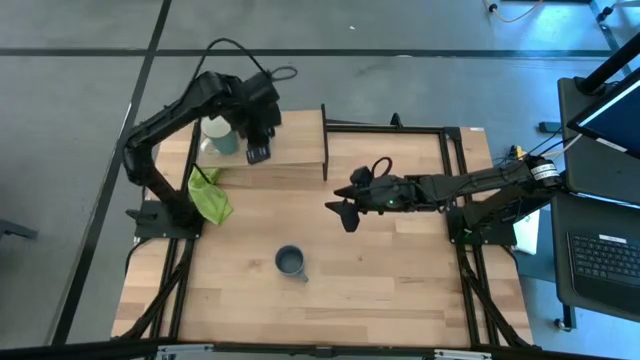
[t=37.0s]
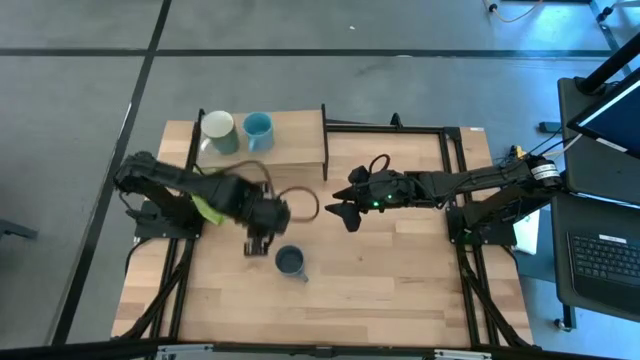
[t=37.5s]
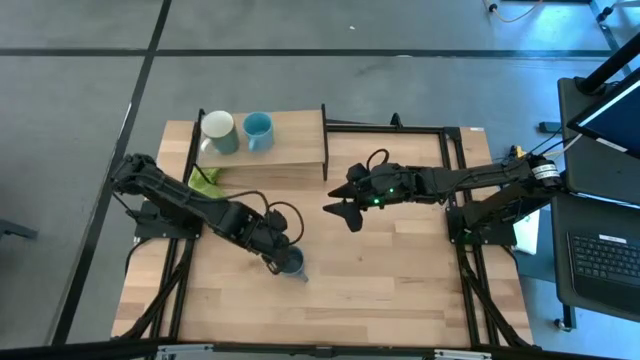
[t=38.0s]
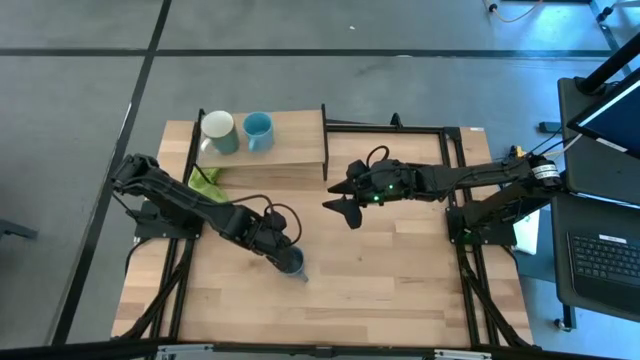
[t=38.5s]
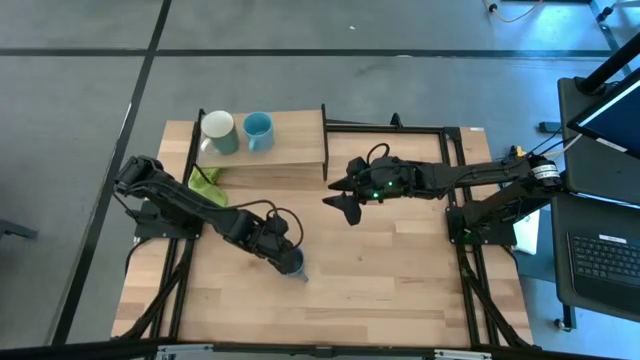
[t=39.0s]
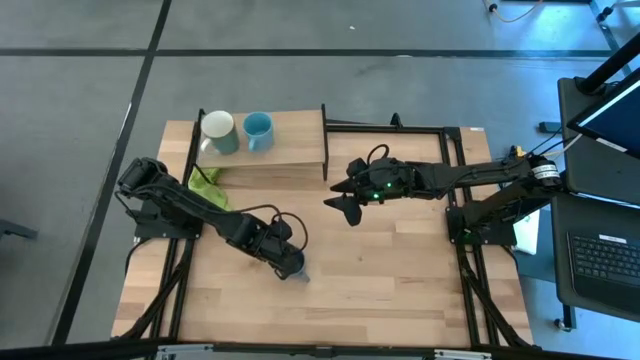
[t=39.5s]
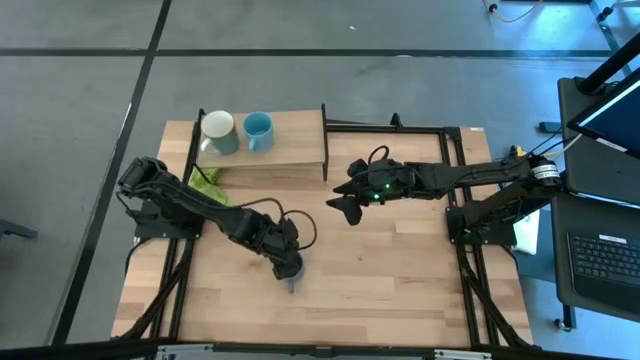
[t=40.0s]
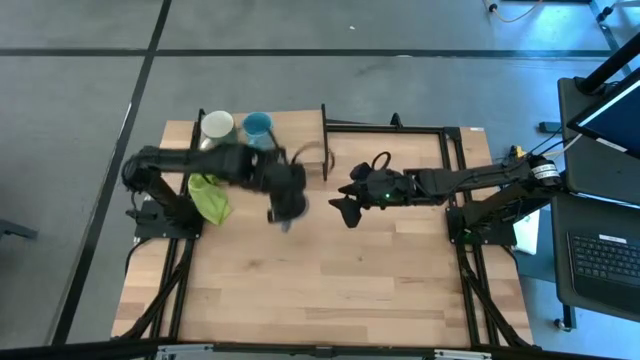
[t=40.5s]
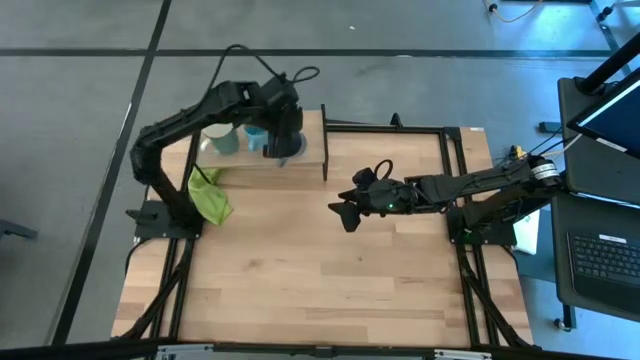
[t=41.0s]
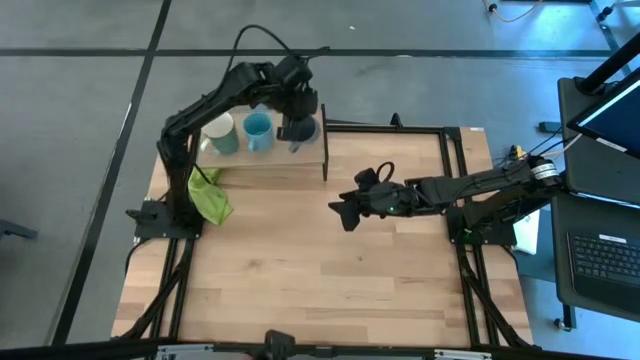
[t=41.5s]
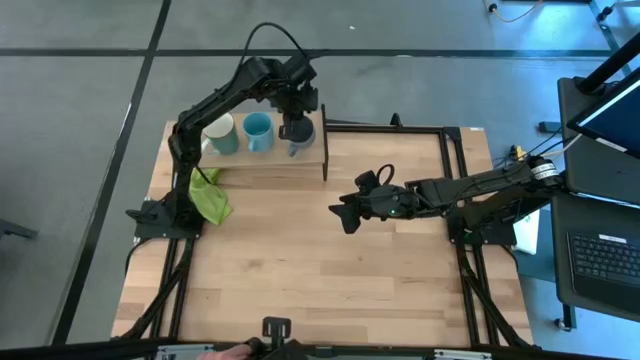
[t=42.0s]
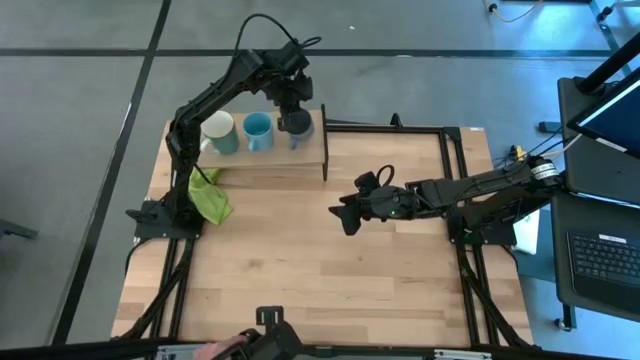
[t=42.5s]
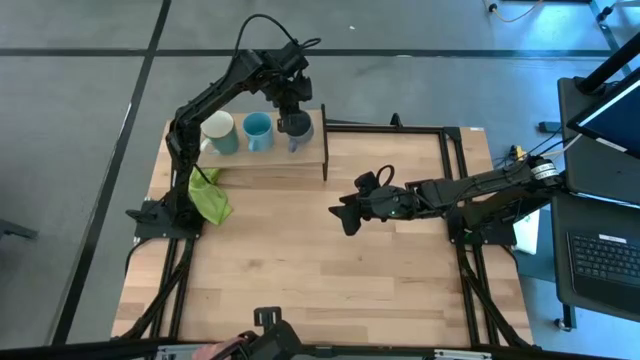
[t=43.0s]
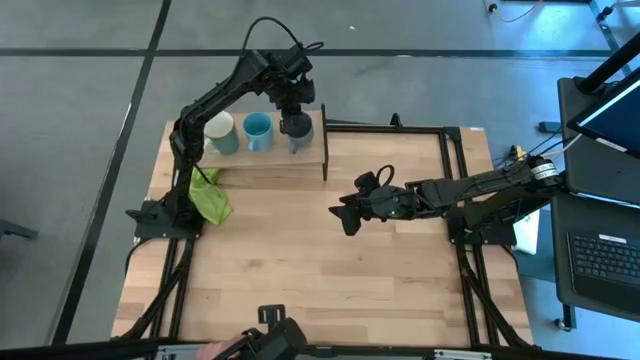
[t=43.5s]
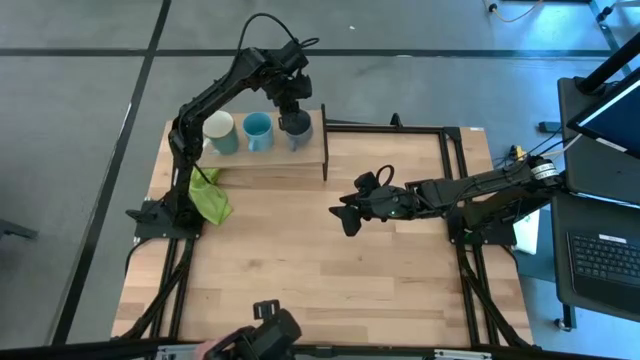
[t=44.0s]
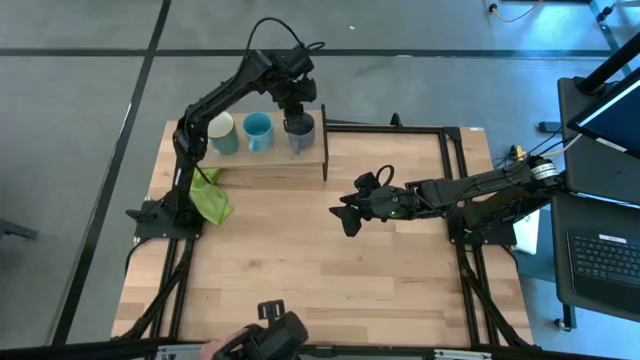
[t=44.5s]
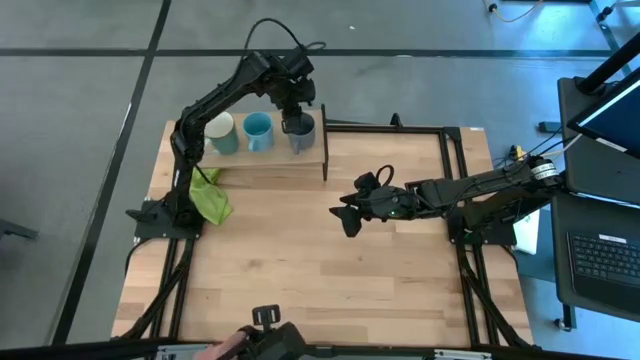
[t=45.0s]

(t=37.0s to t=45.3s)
Task: Stack small to large cups/mugs on shelf
Put the blue mug on the shelf

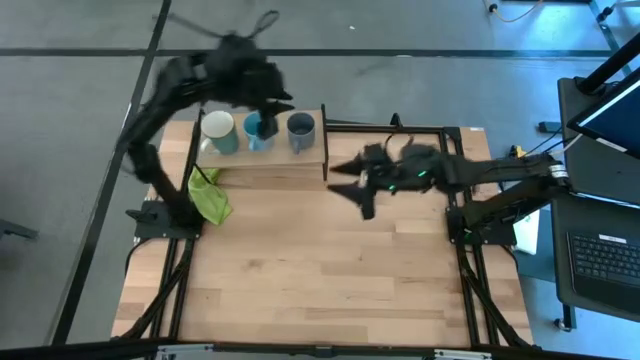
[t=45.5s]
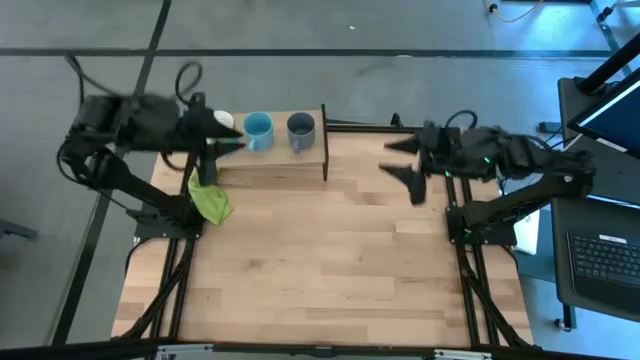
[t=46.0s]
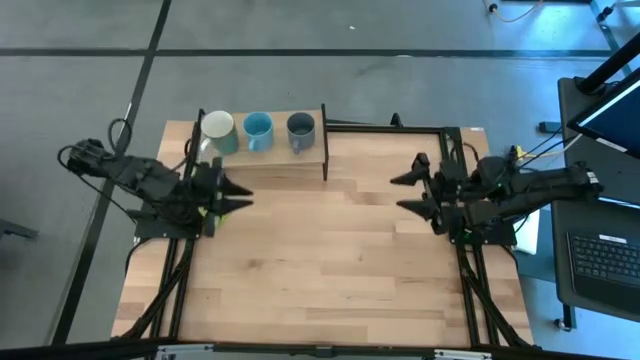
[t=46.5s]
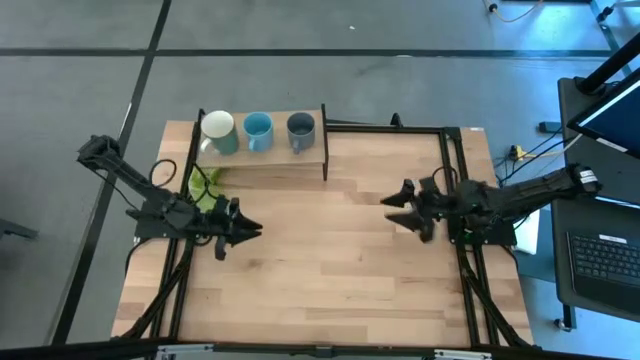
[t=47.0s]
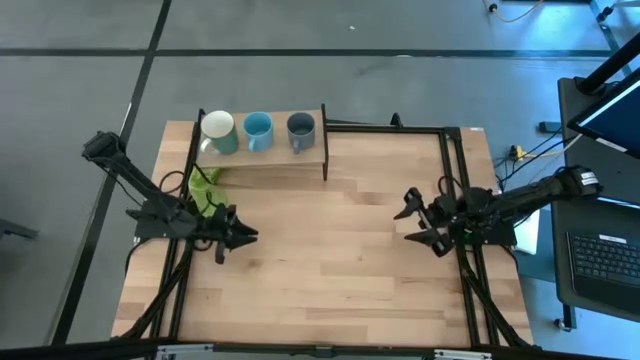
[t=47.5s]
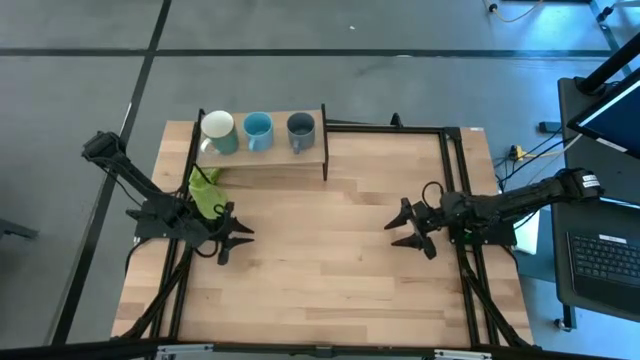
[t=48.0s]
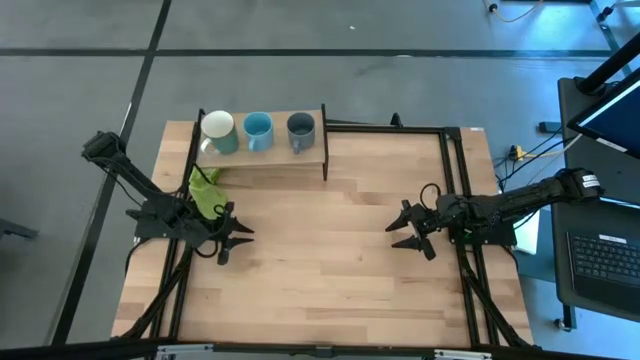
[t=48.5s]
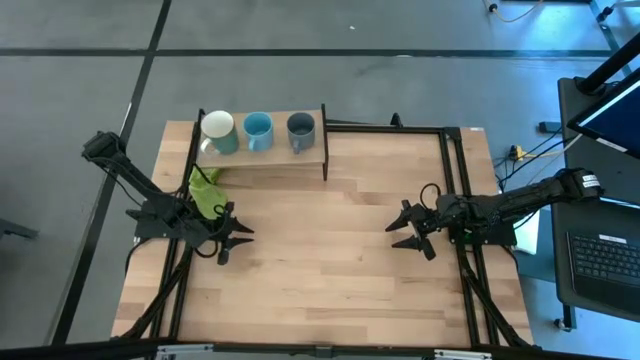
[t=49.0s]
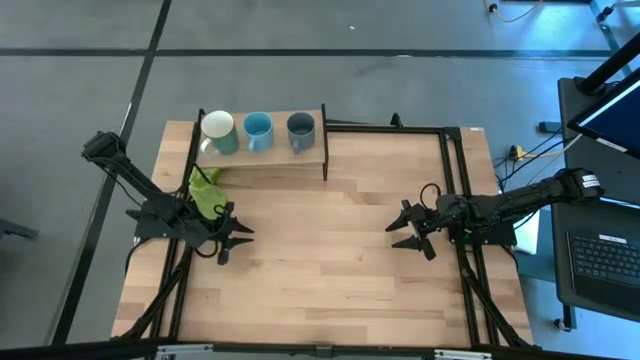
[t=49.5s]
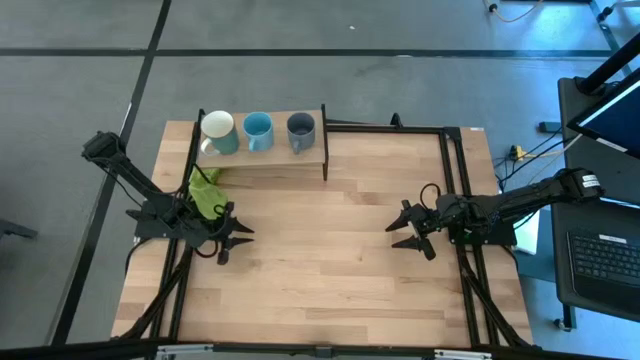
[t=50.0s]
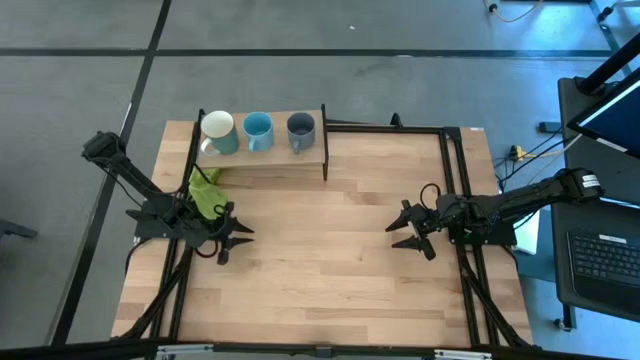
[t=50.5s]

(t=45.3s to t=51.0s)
Return to Home Position
